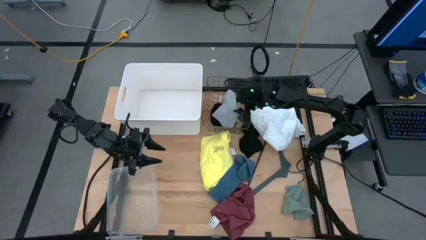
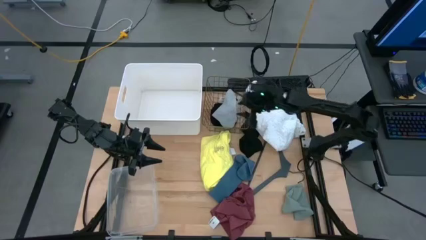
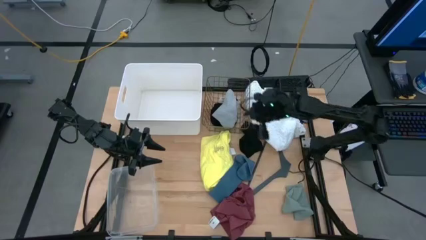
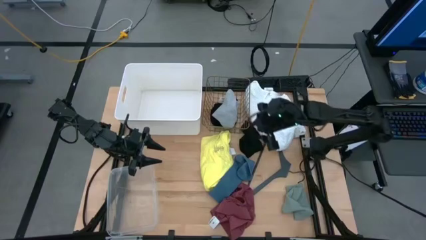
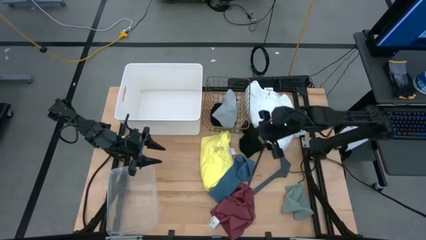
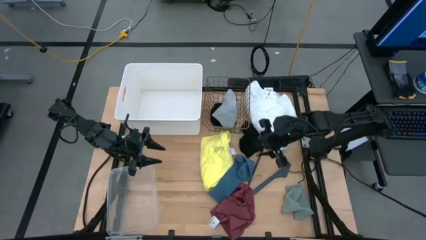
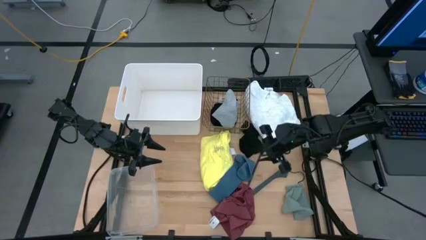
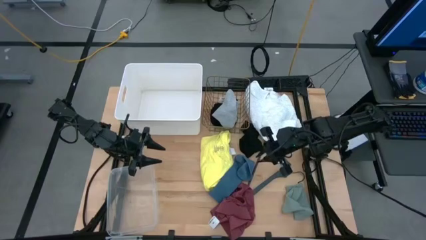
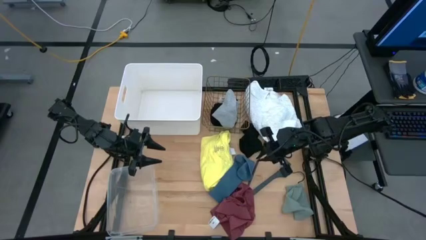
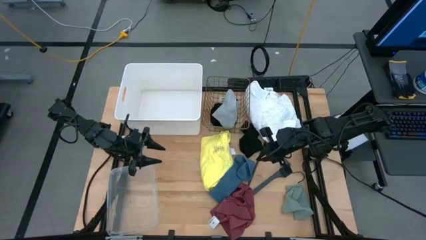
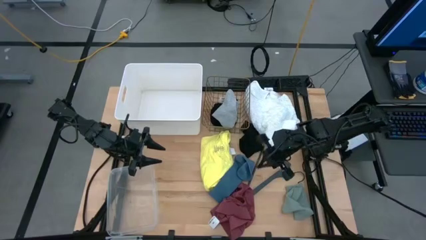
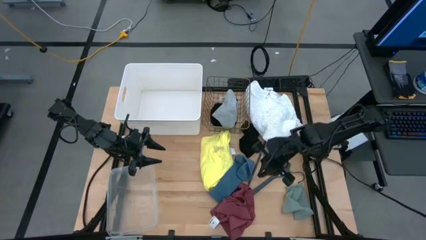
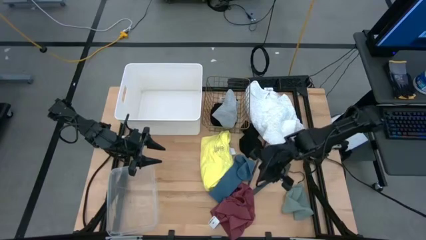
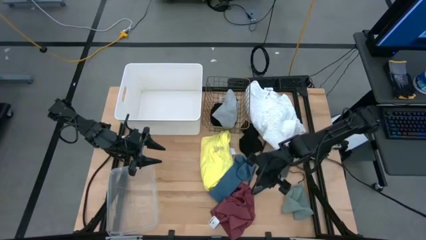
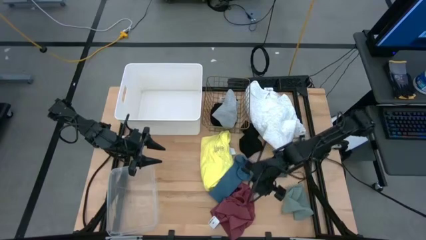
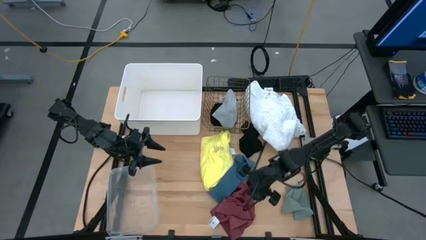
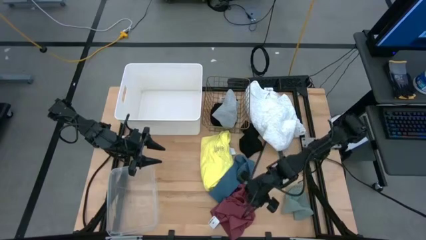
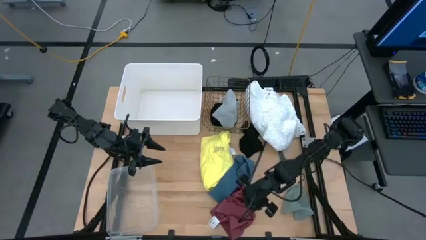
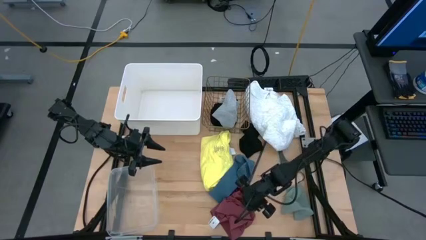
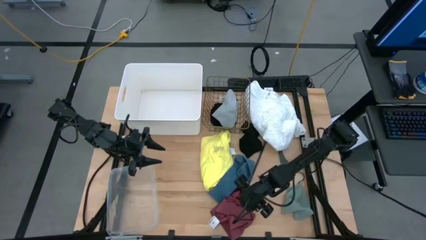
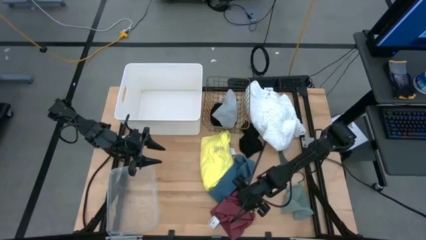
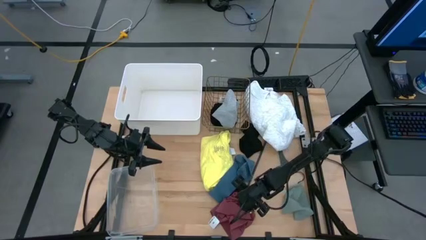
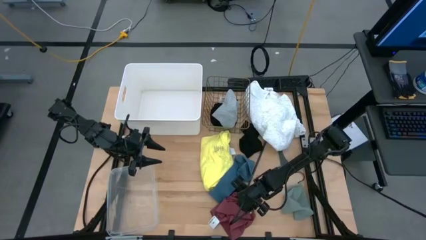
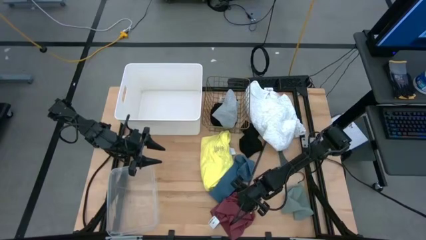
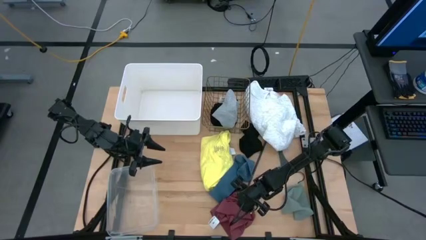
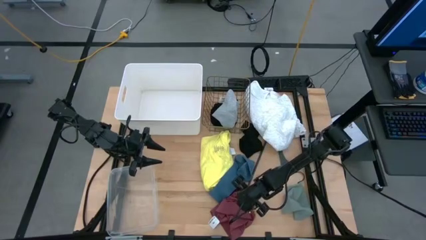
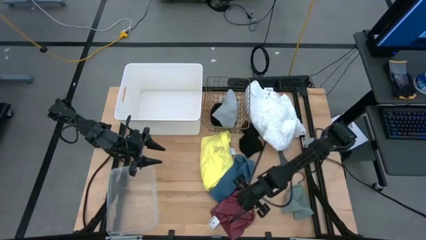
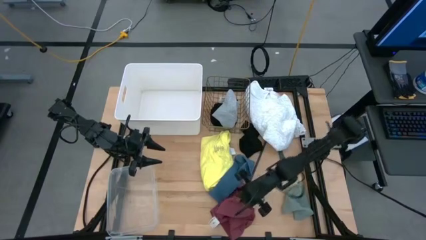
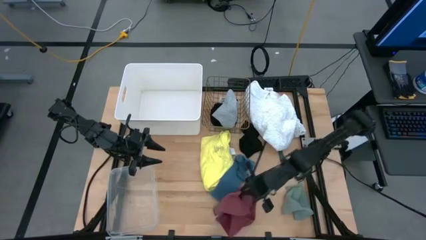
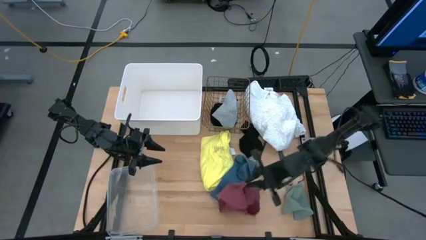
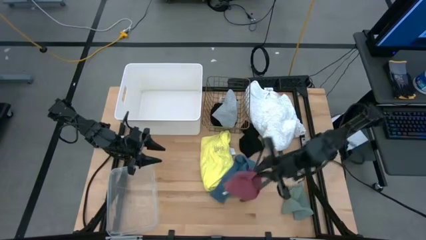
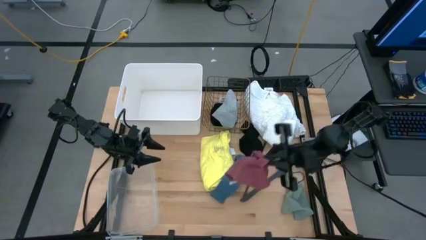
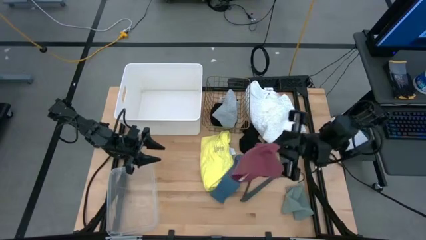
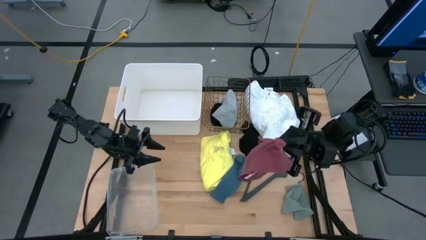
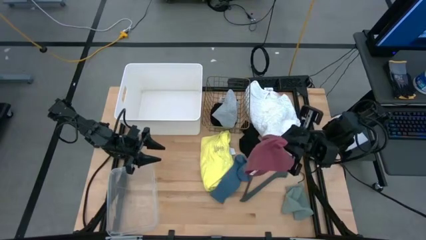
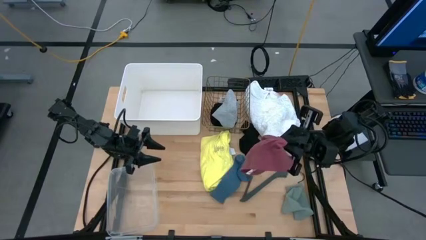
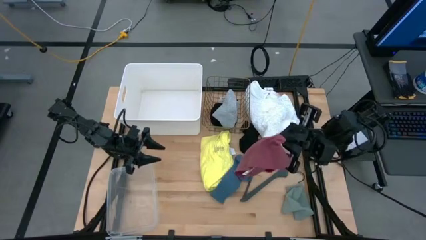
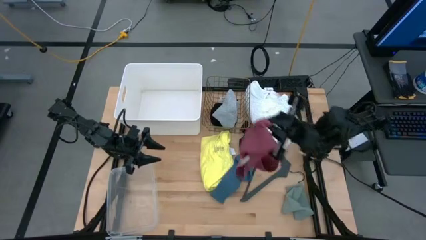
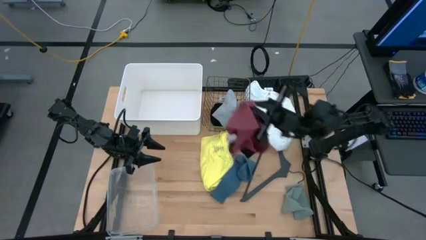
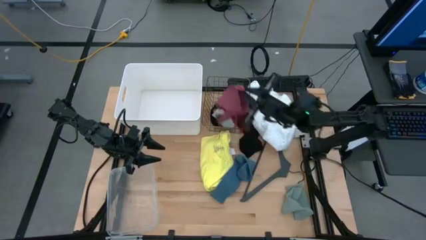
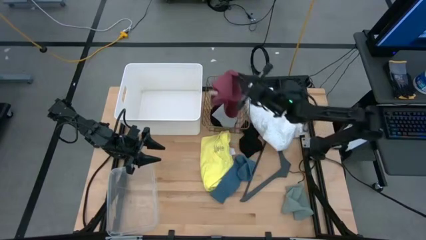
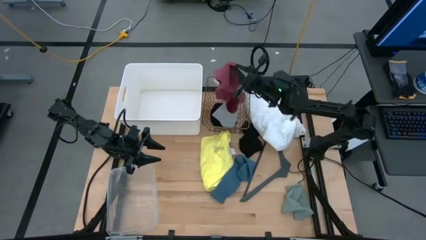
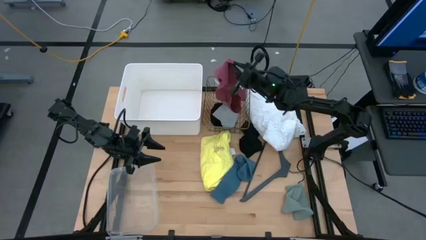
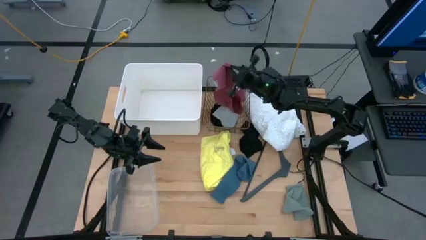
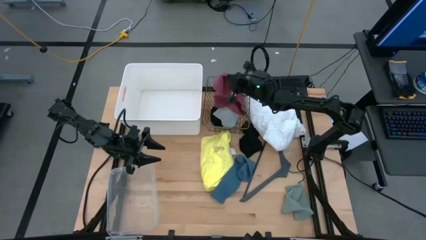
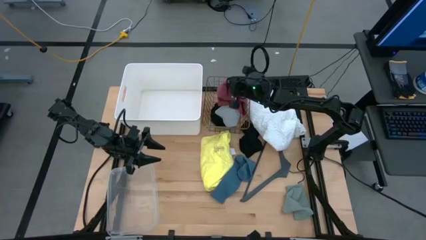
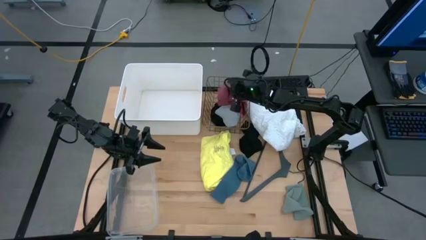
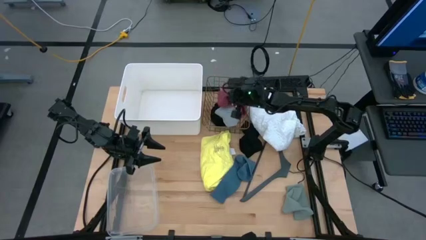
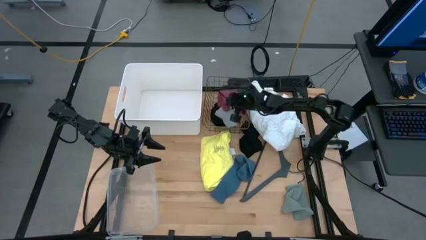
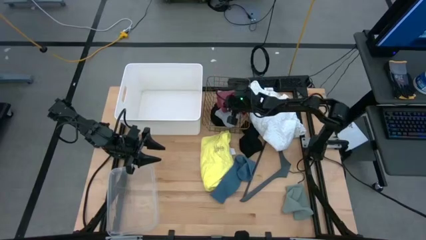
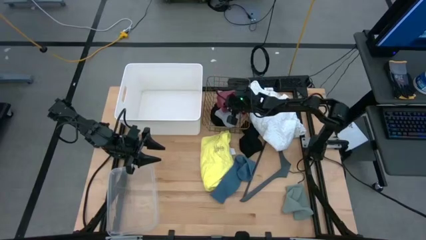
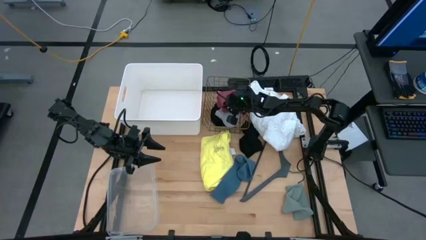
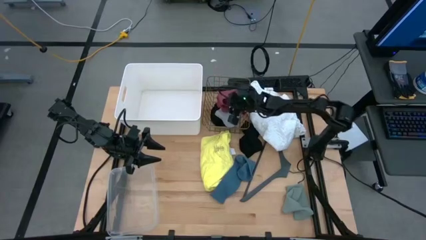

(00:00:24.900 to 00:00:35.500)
Task: Pick & Place Cloths
Put the red underwear into the wire basket

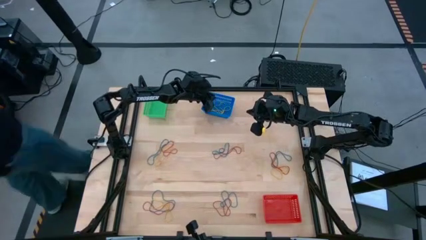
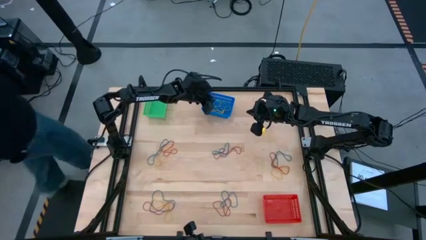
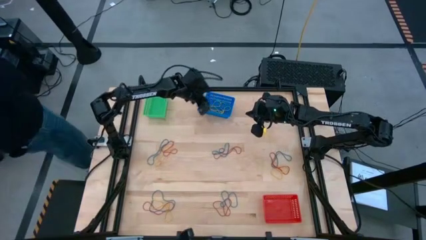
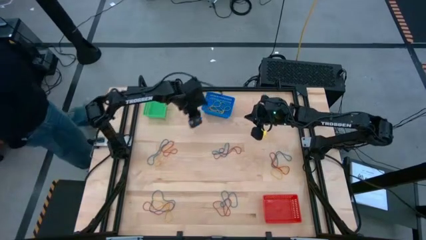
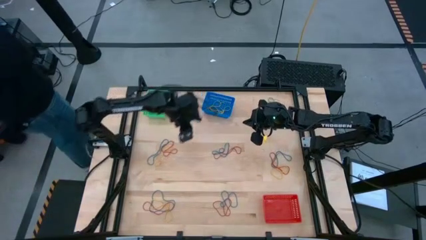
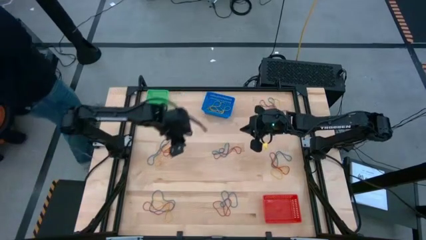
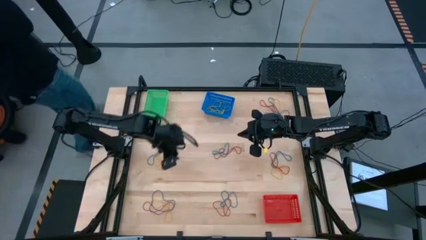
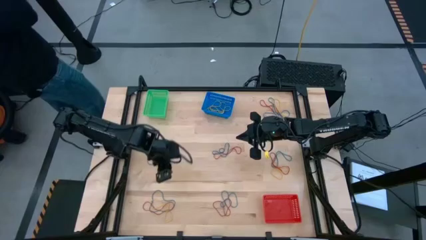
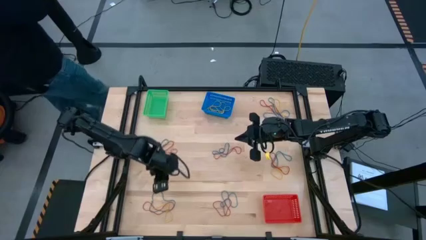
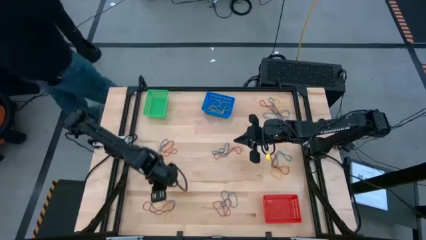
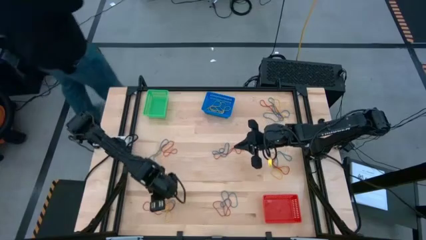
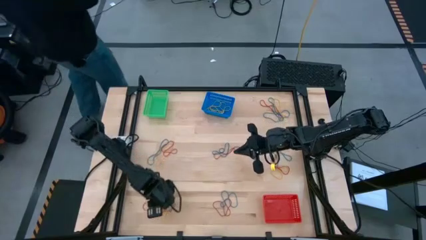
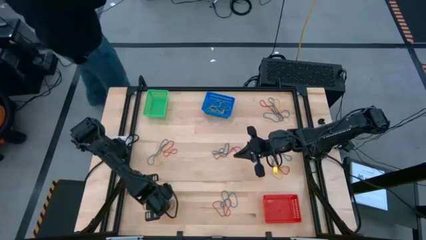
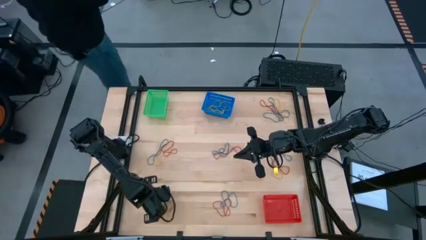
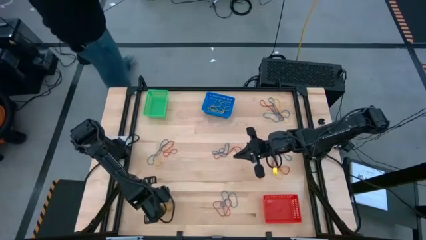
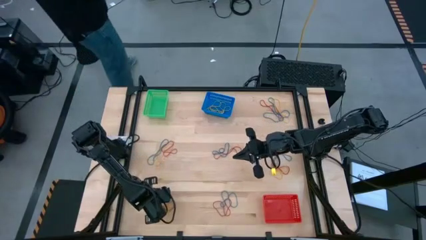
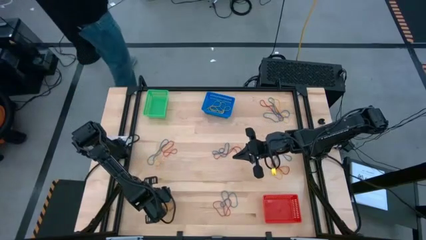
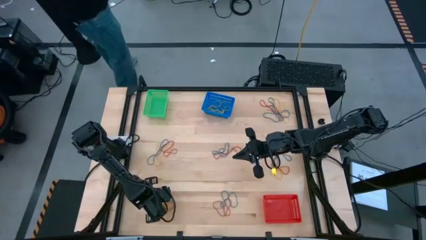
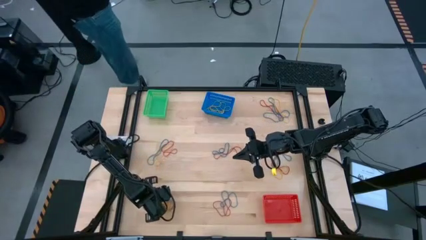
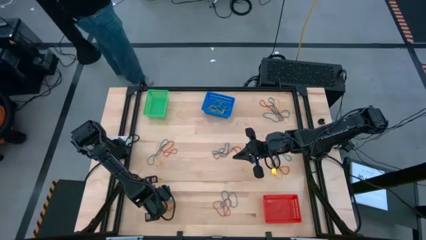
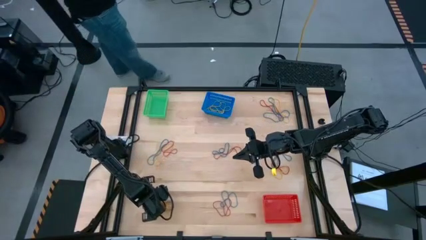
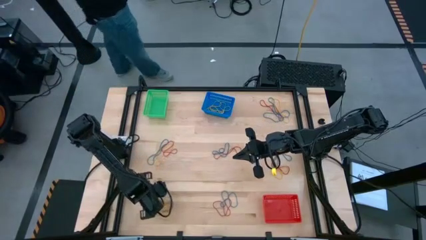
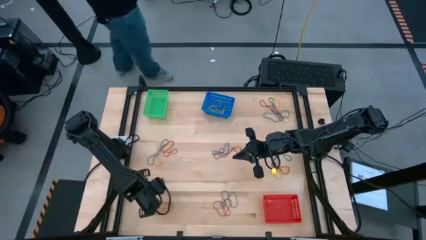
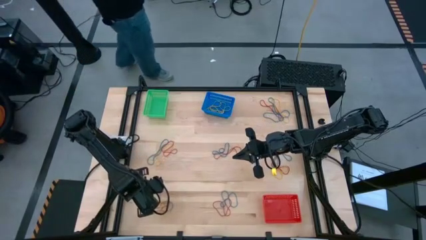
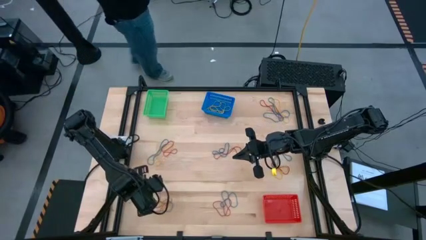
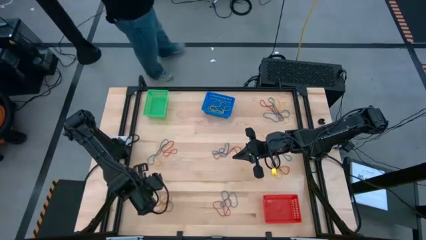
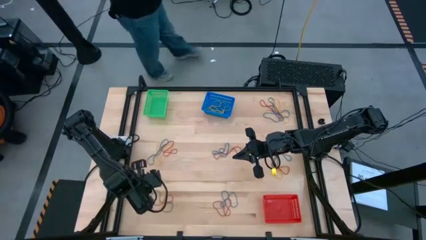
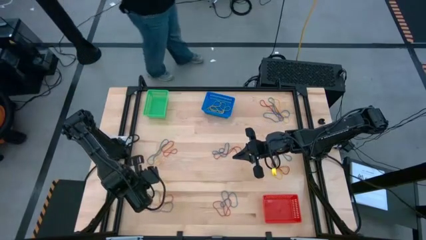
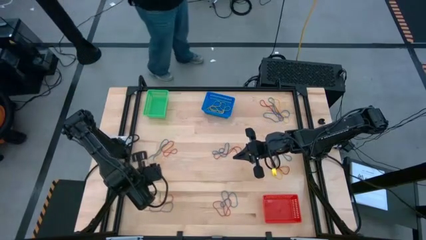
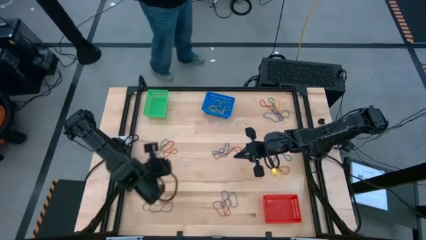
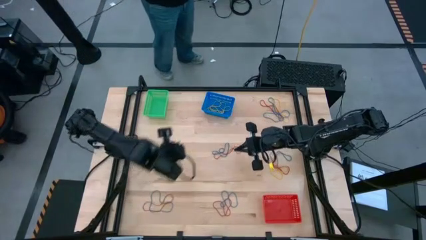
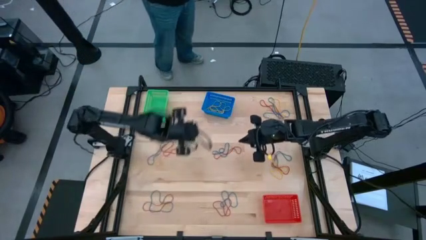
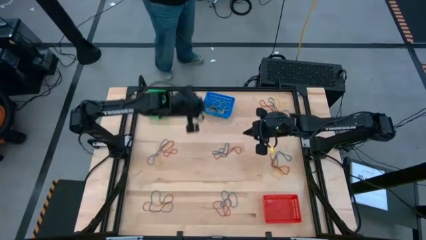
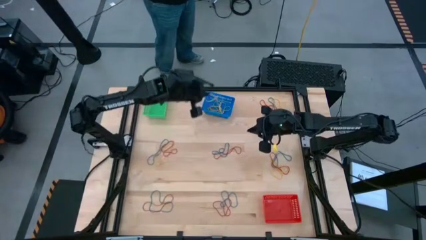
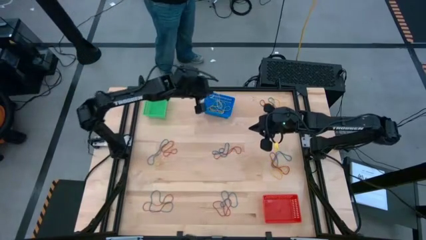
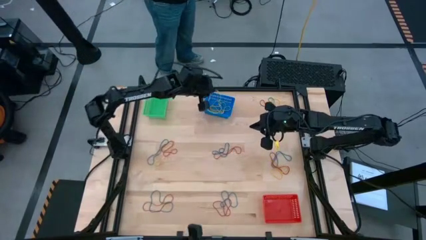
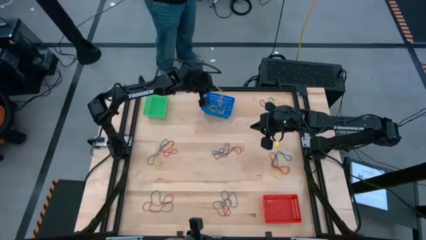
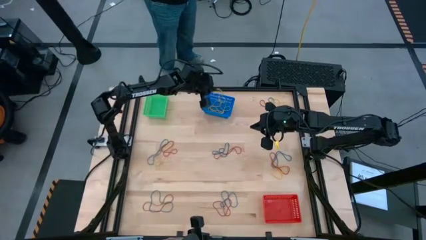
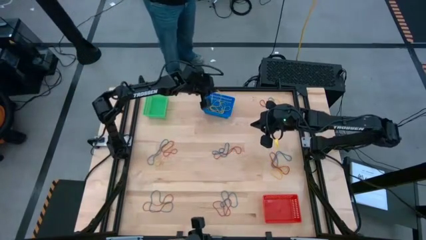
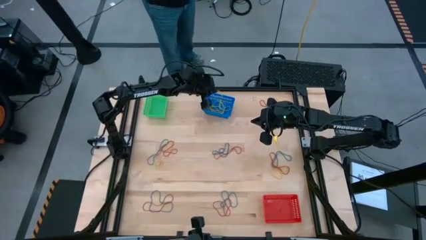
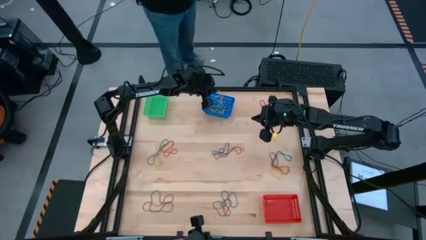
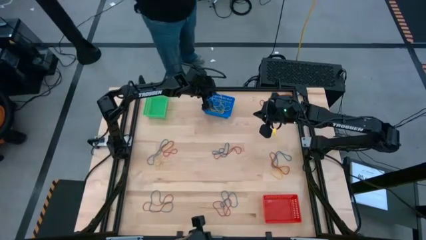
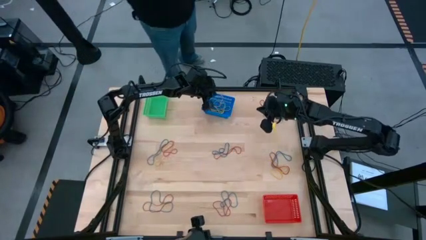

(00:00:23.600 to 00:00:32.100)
Task: Sort rubber bands into baskets
Put the yellow rubber band into the blue bin
